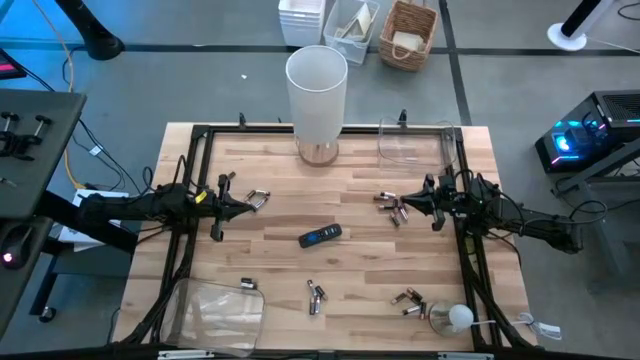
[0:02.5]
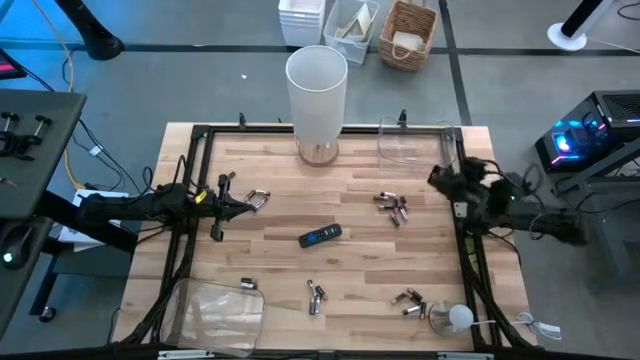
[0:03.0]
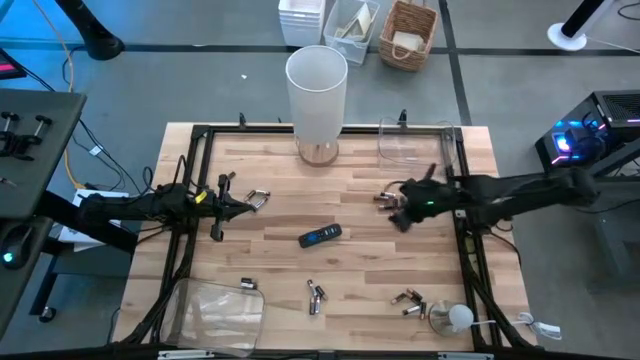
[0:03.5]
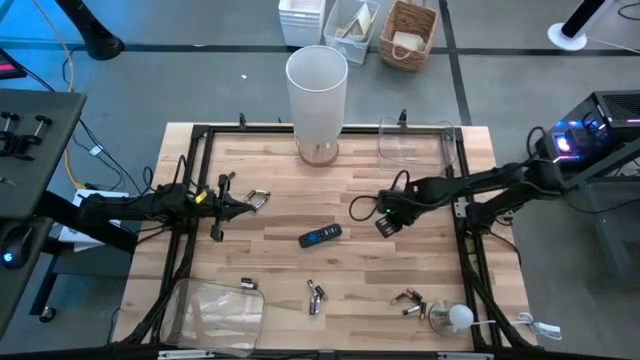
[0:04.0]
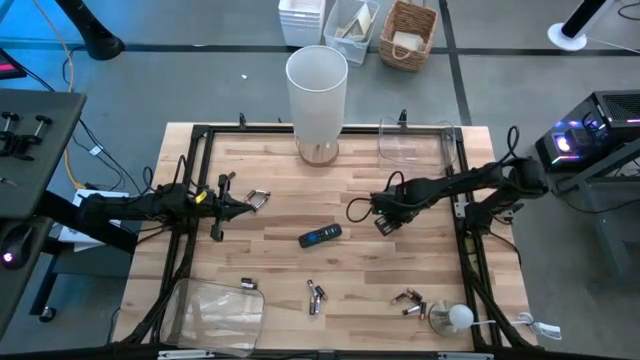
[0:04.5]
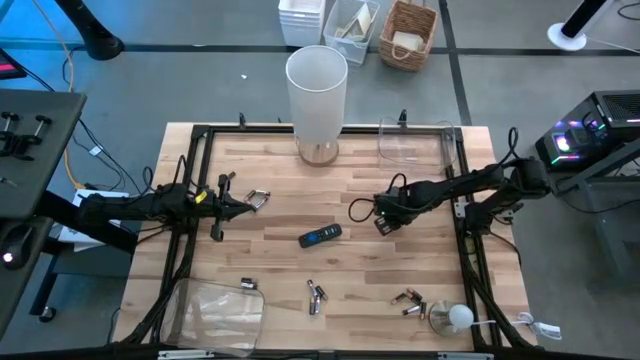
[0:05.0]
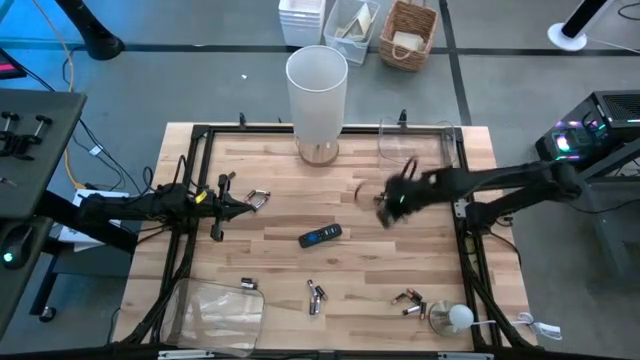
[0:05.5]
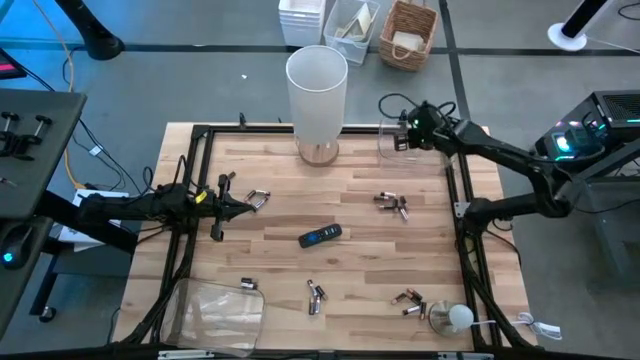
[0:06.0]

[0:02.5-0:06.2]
Task: Sort batteries
Put the black battery into the top transparent bin

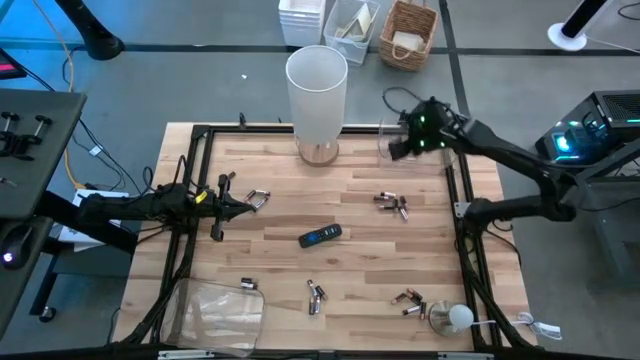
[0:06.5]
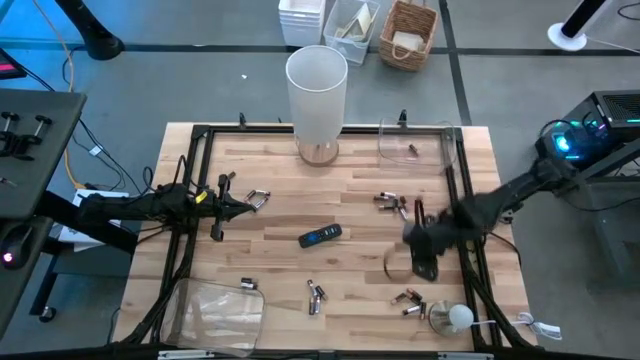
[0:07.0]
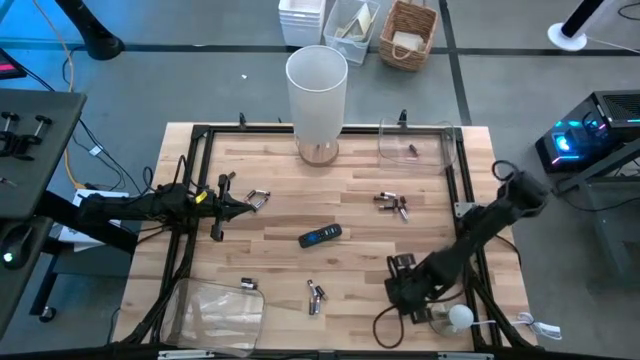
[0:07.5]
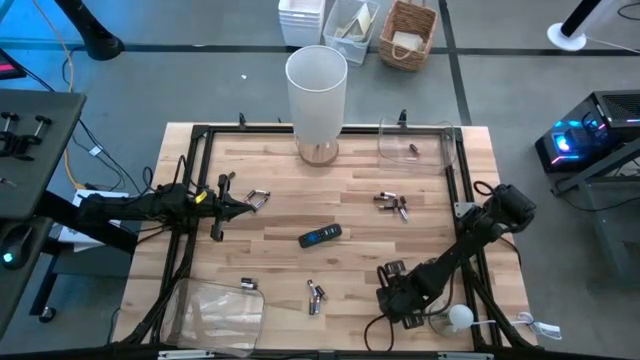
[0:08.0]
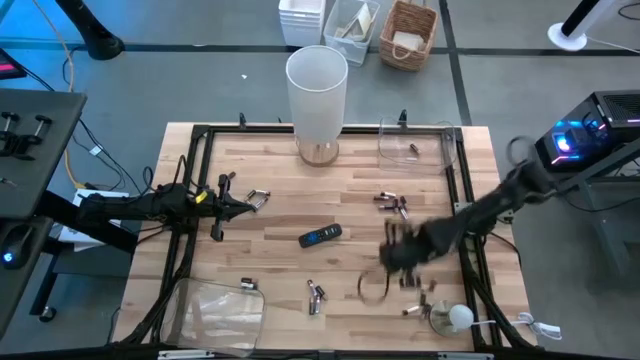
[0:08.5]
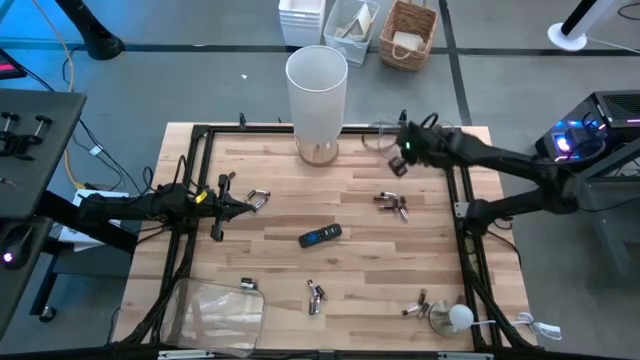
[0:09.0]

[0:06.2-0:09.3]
Put the black battery into the top transparent bin

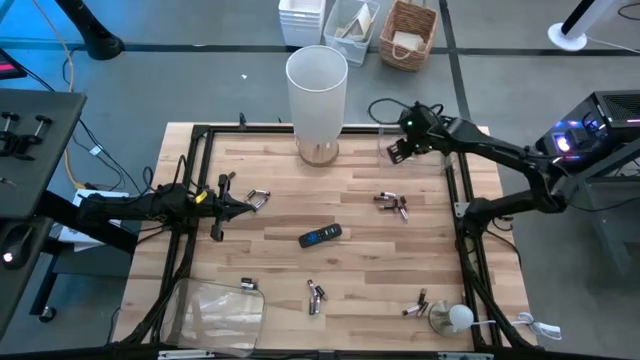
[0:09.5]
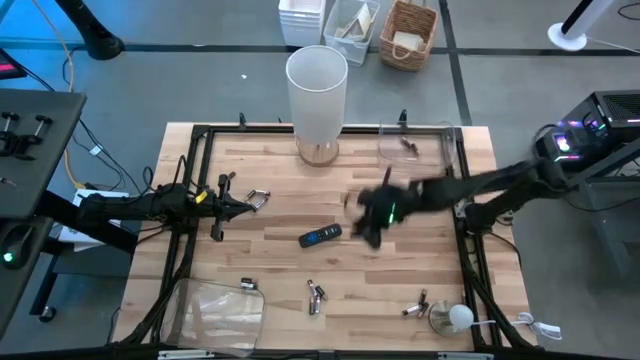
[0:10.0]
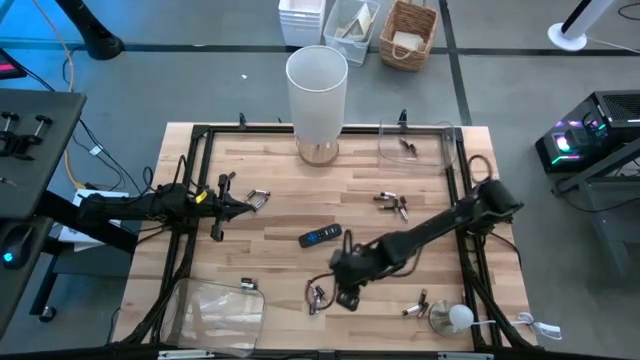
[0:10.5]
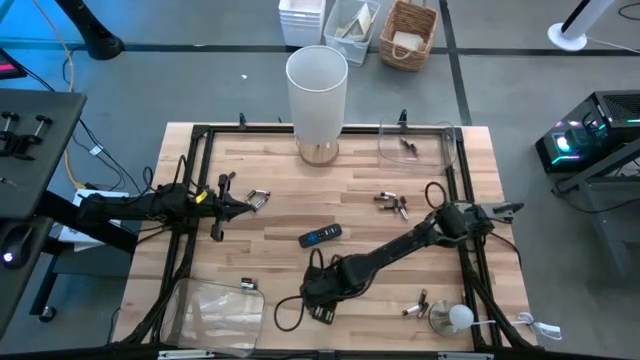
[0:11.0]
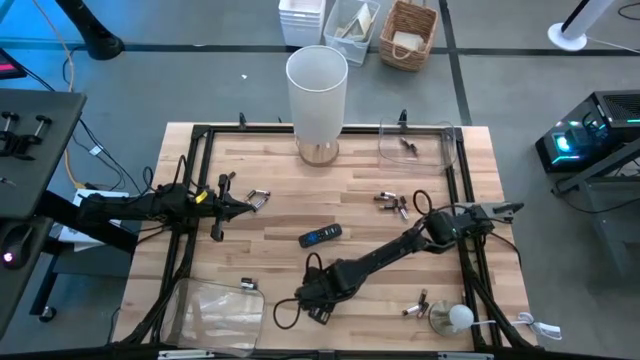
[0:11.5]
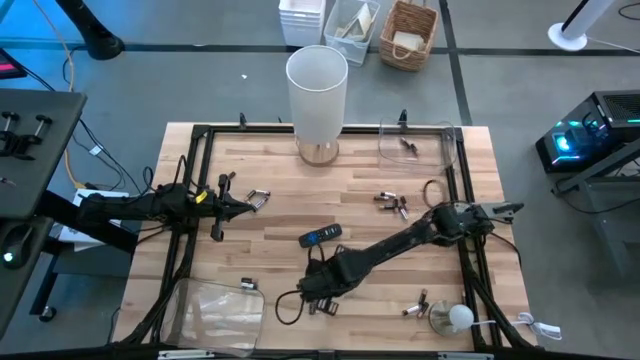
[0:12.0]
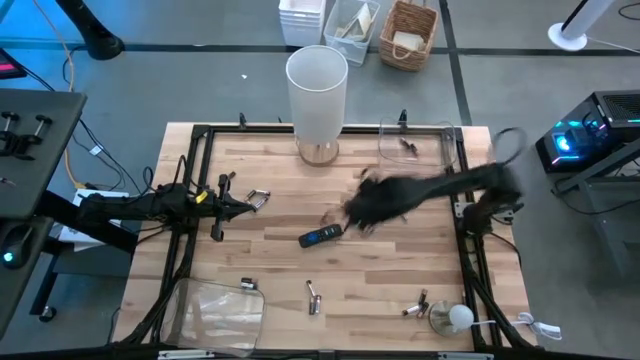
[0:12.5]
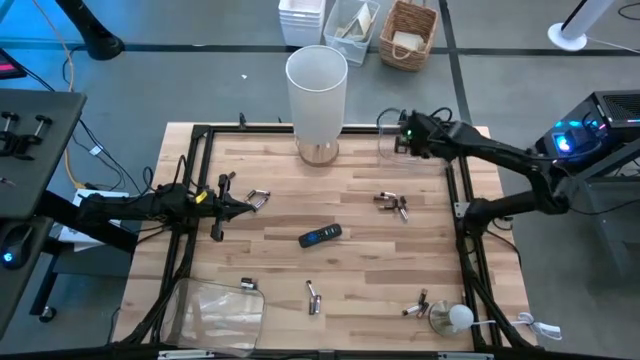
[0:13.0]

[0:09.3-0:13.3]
Put the black battery into the top transparent bin

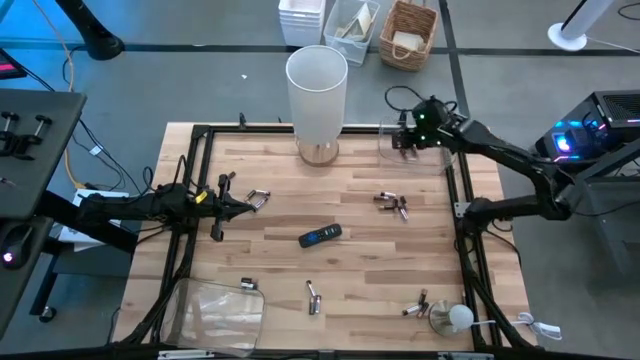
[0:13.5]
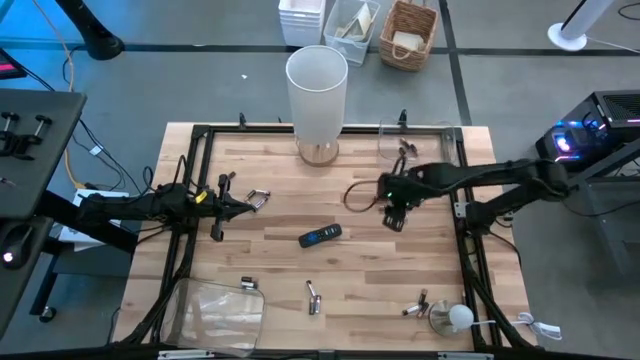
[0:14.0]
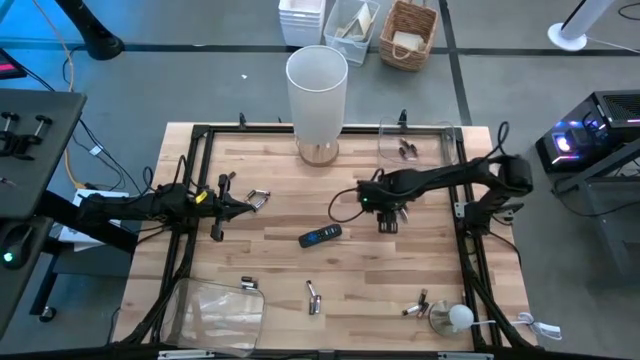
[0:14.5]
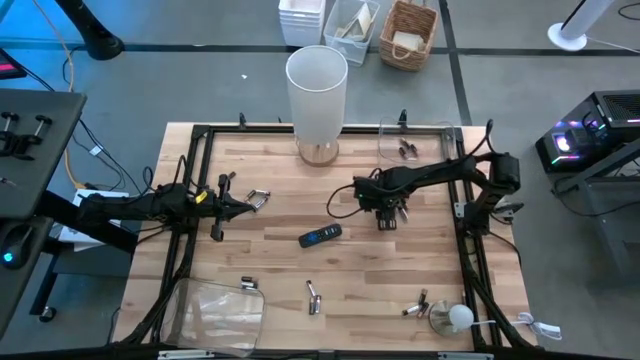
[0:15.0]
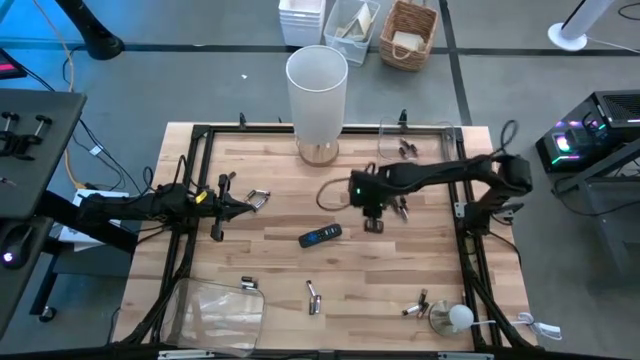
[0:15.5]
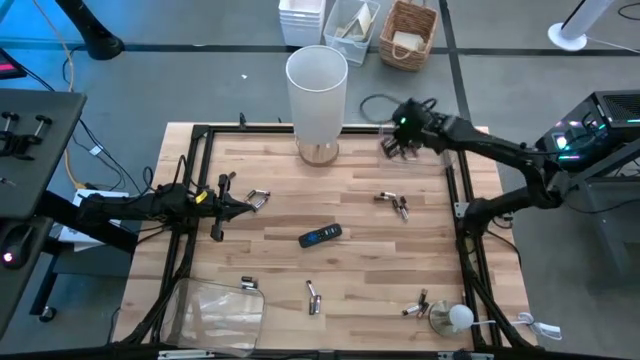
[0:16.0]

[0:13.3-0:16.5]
Put the black battery into the top transparent bin

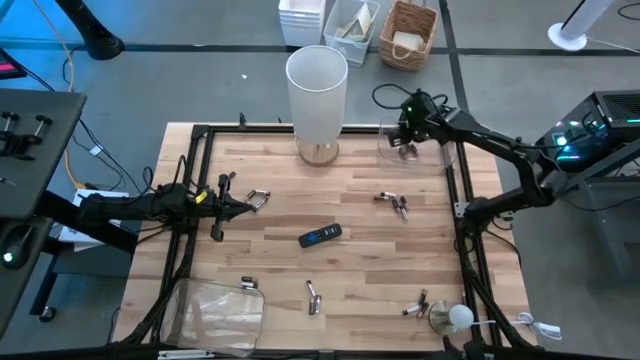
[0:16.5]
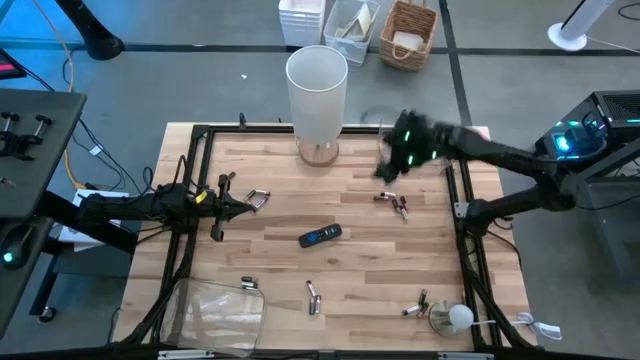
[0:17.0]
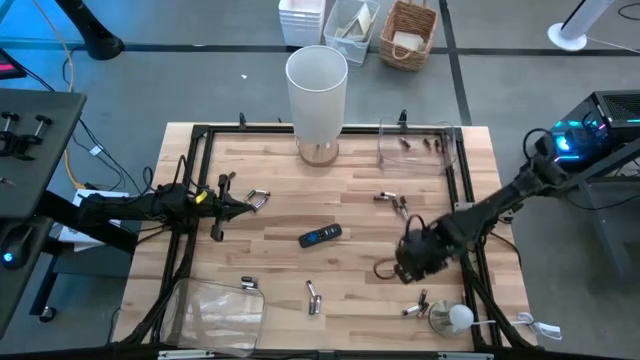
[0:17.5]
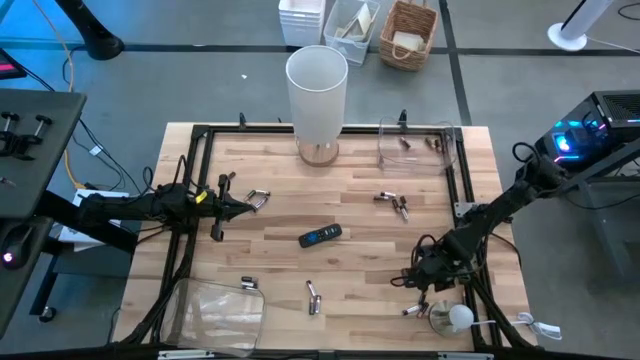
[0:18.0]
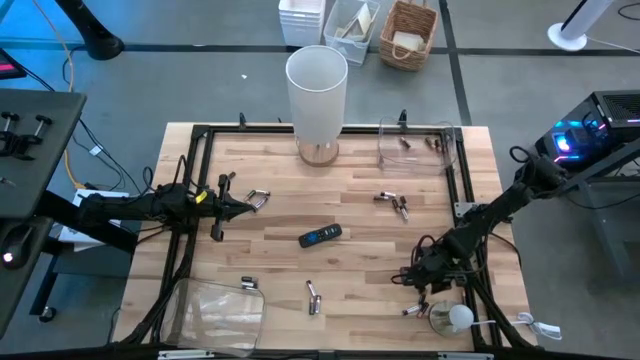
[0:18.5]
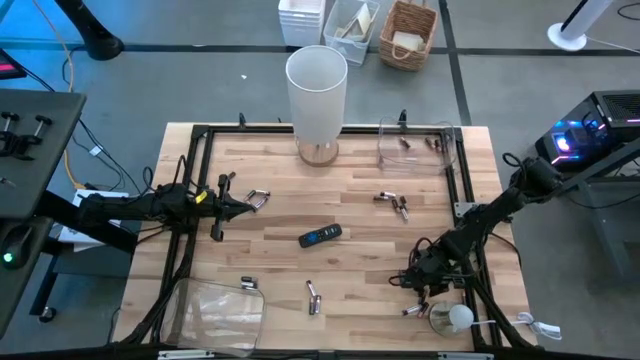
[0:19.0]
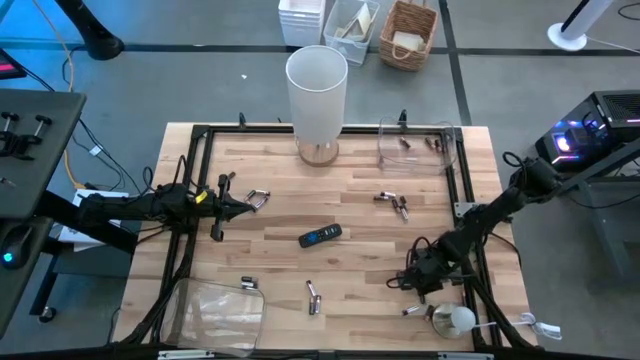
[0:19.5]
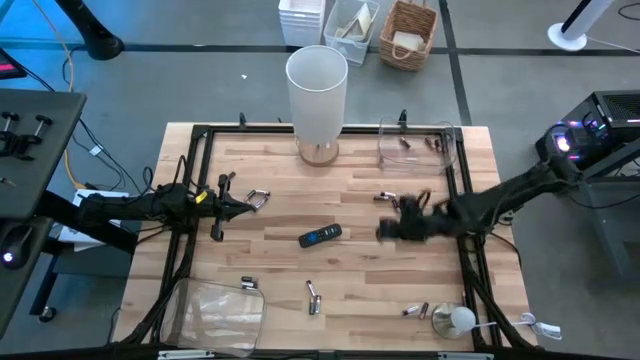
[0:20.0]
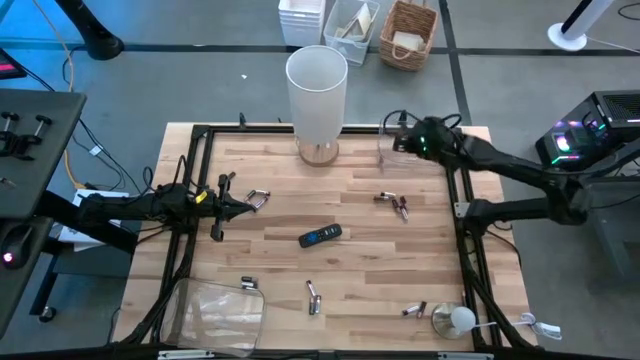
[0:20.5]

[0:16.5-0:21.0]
Put the black battery into the top transparent bin

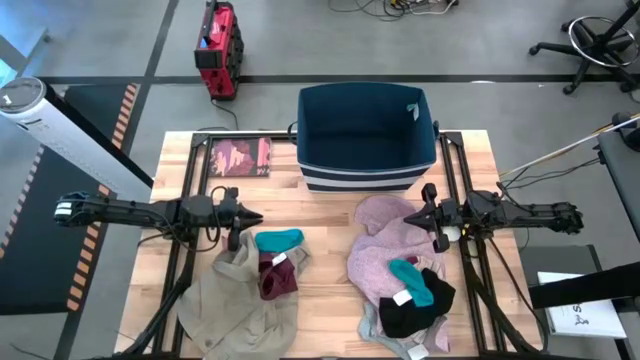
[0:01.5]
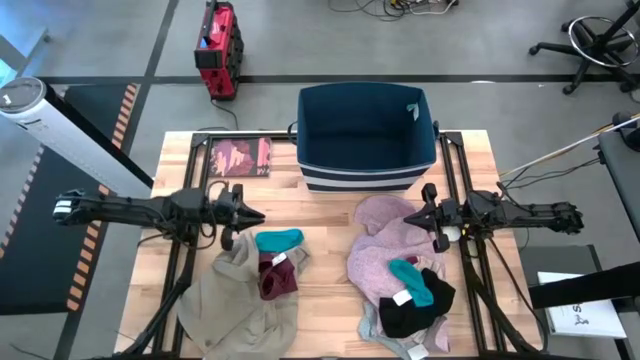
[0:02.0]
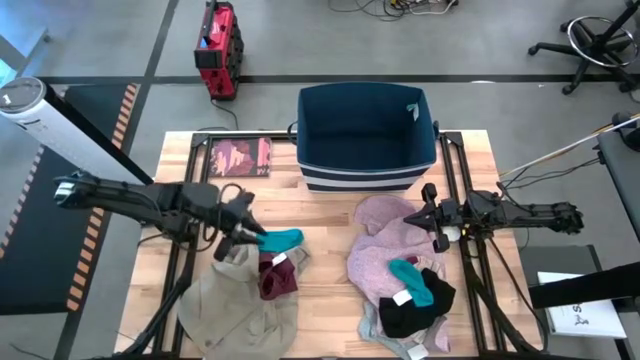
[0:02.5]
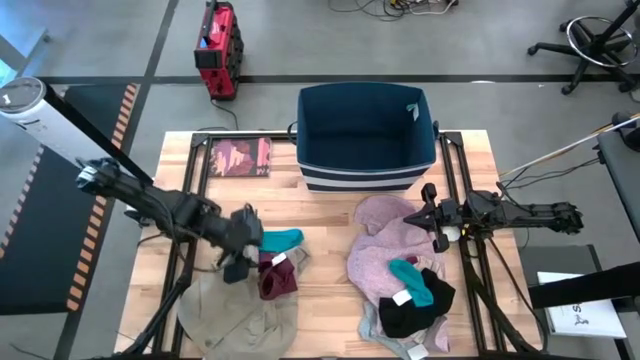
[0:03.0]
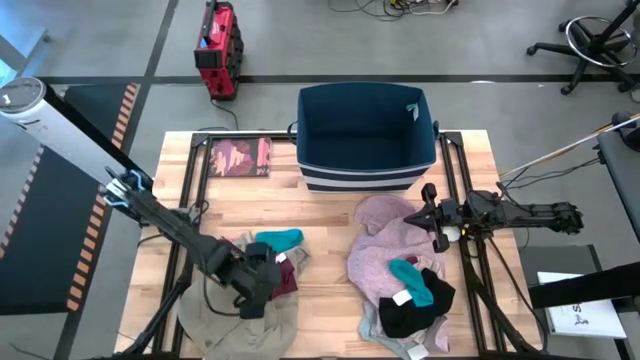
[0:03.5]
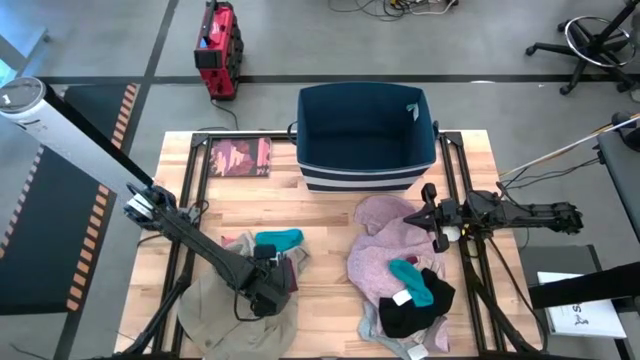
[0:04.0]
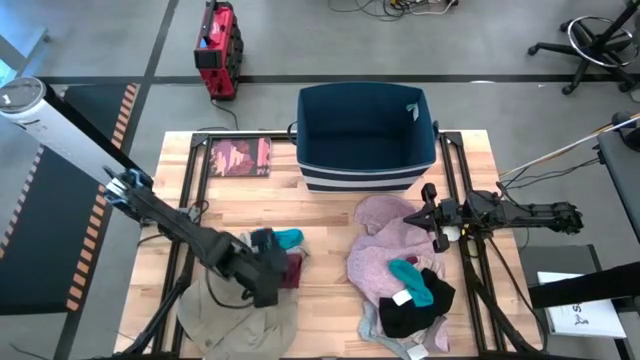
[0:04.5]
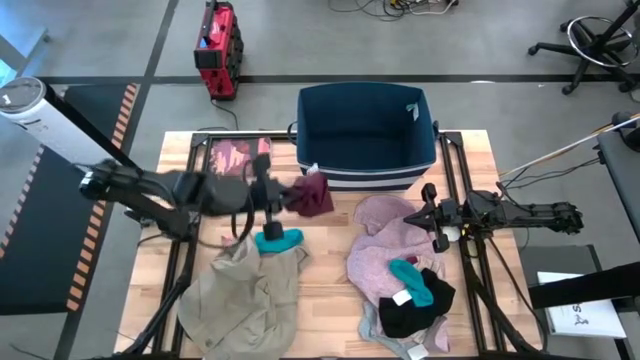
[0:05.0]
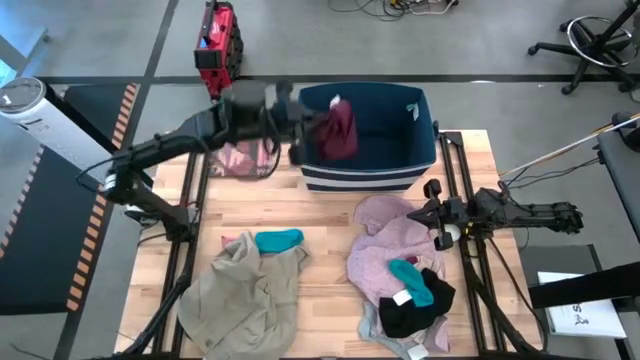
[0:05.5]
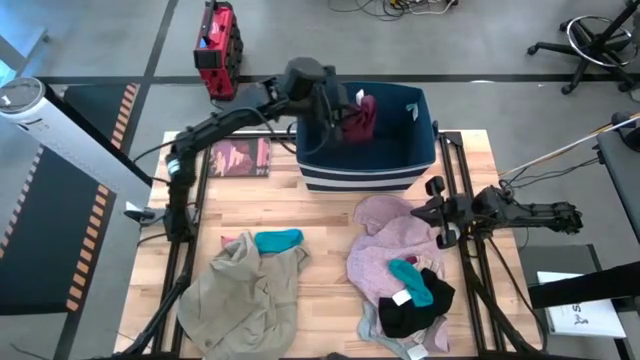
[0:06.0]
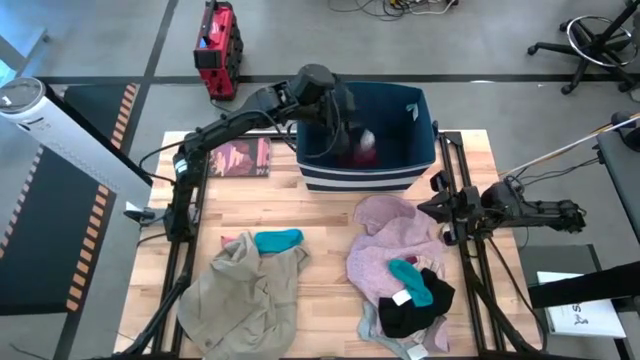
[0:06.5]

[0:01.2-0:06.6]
Task: Sort clothes
Put the red underwear into the blue laundry bin
